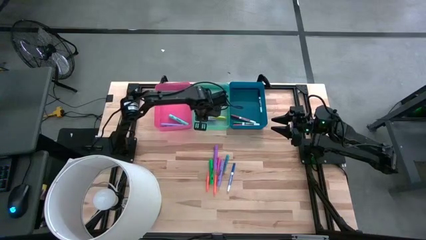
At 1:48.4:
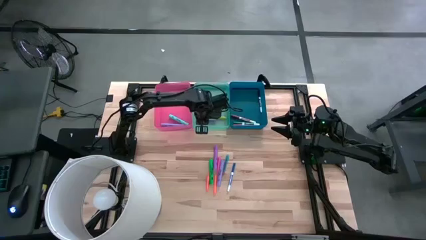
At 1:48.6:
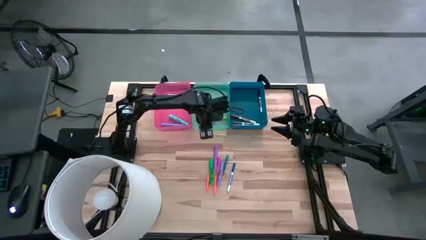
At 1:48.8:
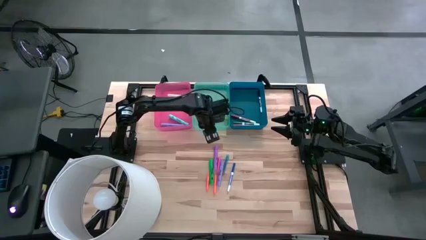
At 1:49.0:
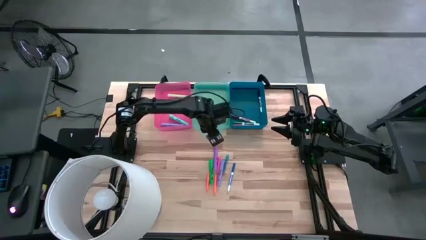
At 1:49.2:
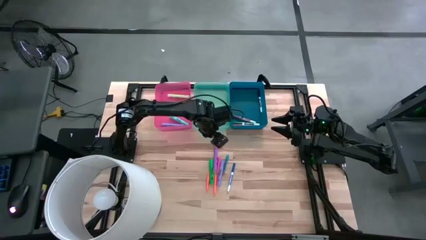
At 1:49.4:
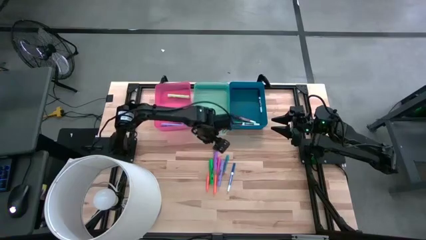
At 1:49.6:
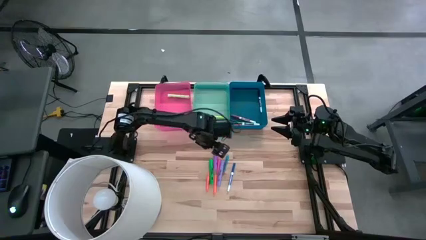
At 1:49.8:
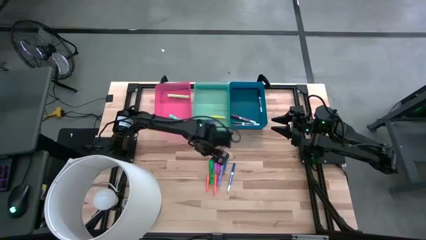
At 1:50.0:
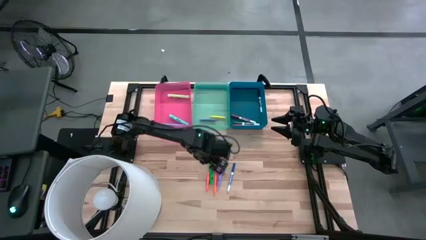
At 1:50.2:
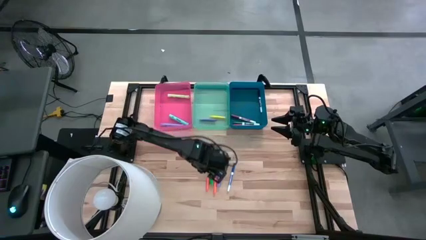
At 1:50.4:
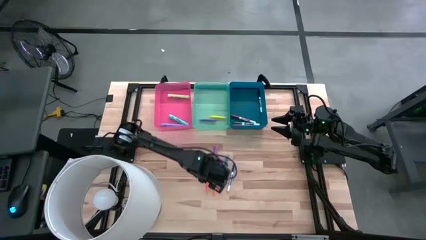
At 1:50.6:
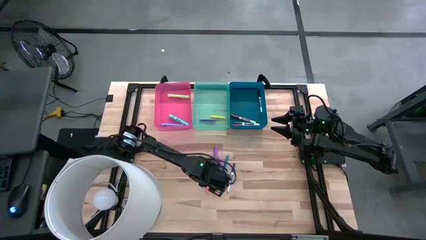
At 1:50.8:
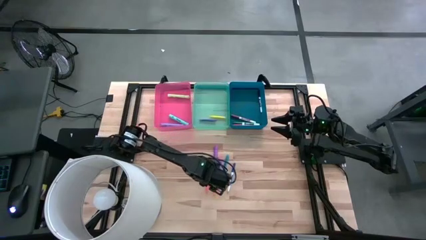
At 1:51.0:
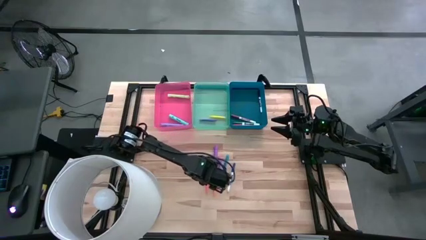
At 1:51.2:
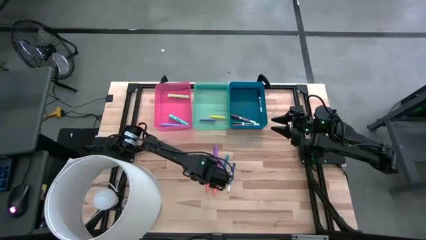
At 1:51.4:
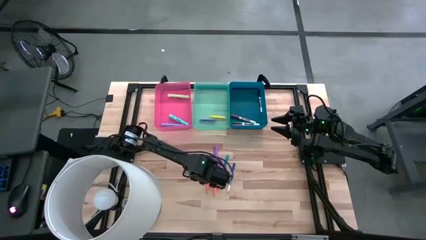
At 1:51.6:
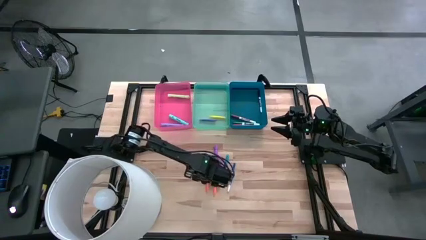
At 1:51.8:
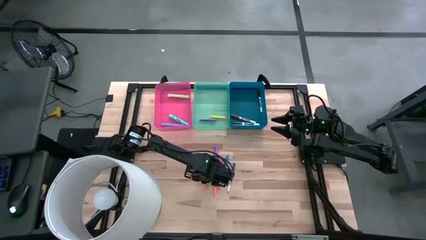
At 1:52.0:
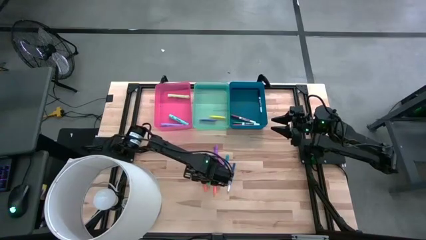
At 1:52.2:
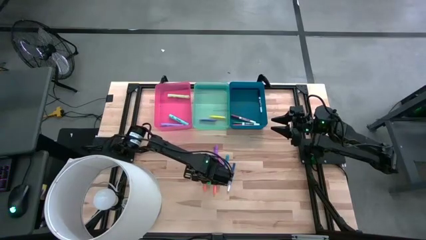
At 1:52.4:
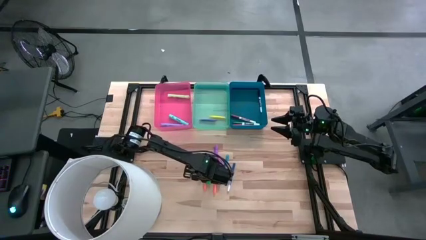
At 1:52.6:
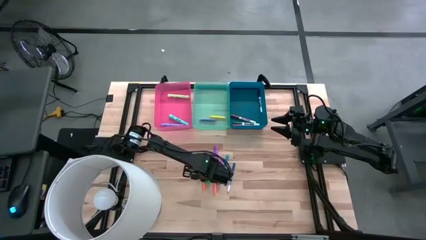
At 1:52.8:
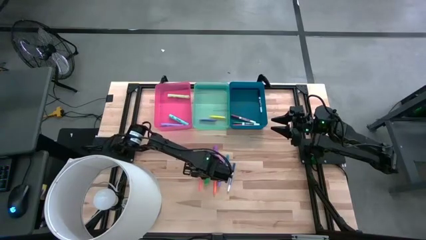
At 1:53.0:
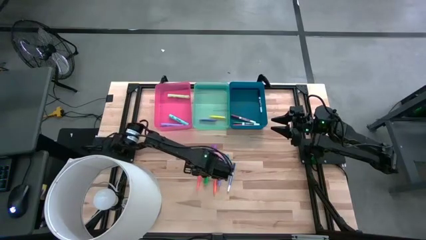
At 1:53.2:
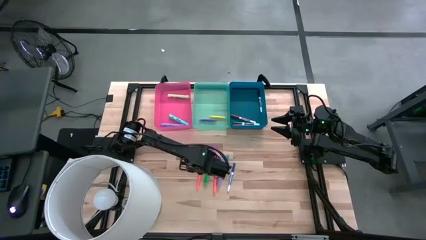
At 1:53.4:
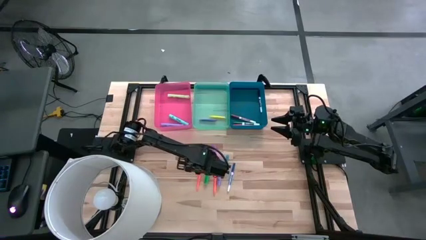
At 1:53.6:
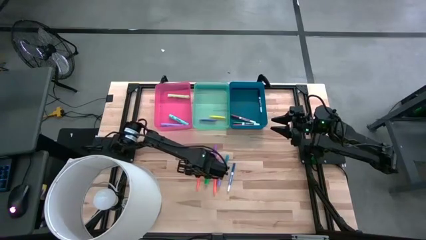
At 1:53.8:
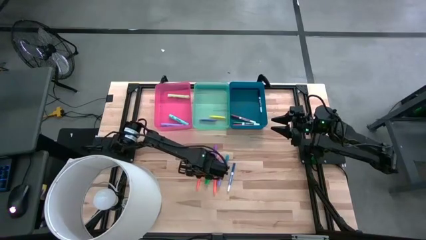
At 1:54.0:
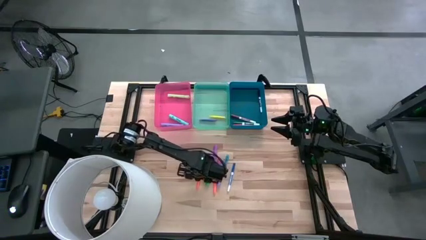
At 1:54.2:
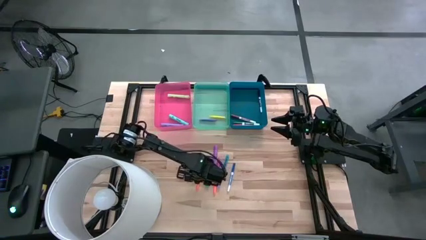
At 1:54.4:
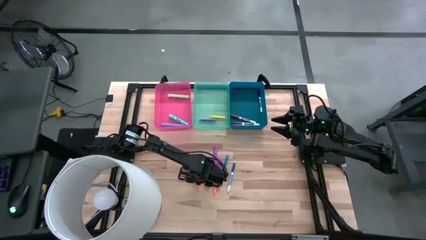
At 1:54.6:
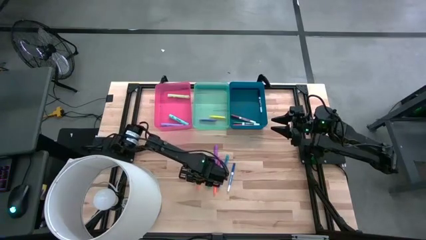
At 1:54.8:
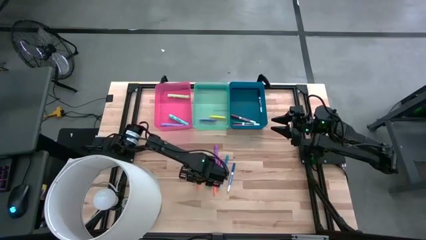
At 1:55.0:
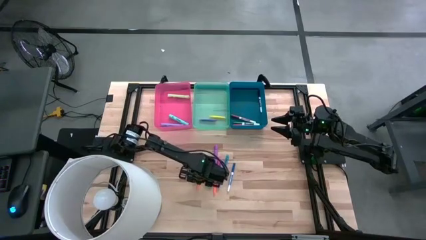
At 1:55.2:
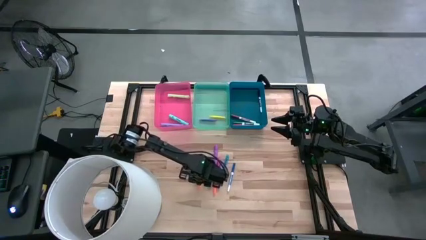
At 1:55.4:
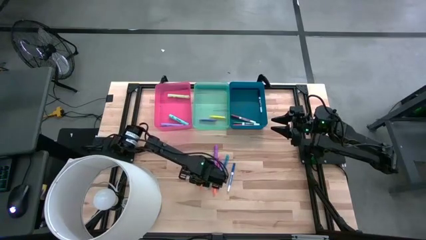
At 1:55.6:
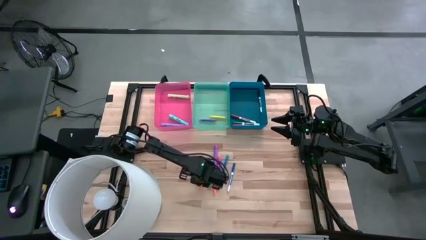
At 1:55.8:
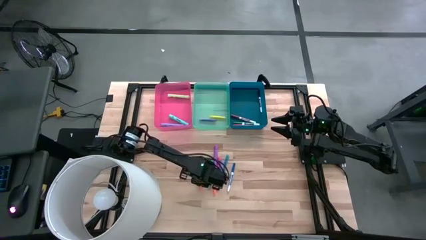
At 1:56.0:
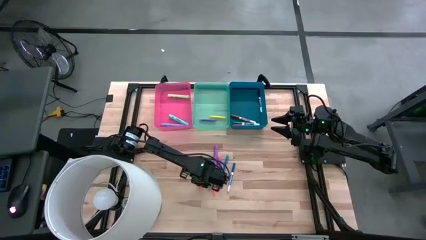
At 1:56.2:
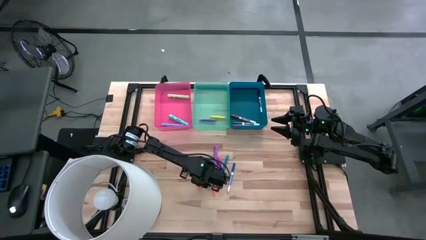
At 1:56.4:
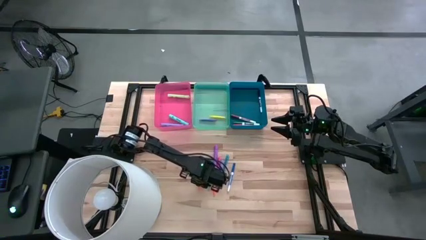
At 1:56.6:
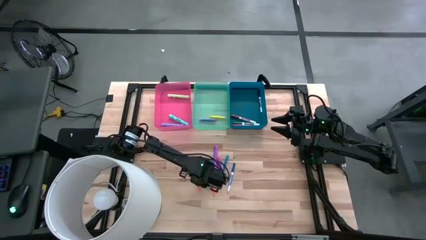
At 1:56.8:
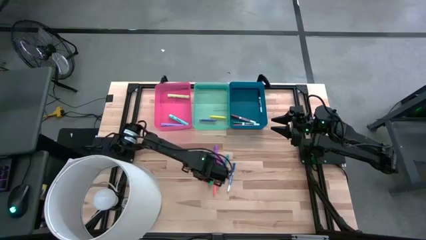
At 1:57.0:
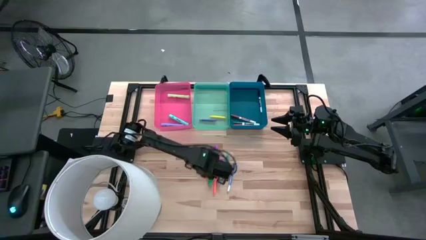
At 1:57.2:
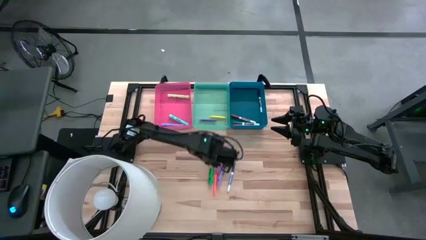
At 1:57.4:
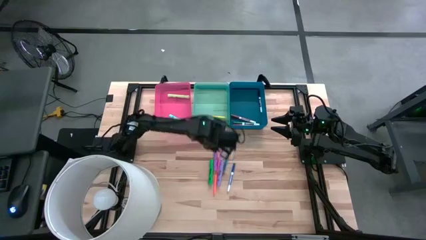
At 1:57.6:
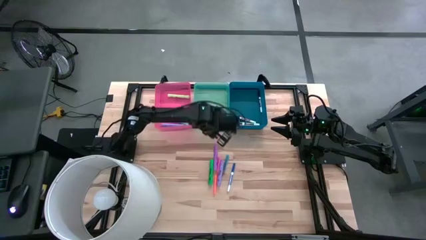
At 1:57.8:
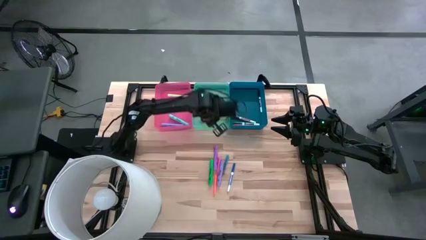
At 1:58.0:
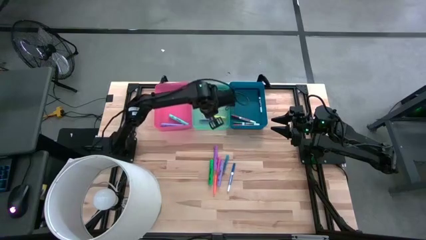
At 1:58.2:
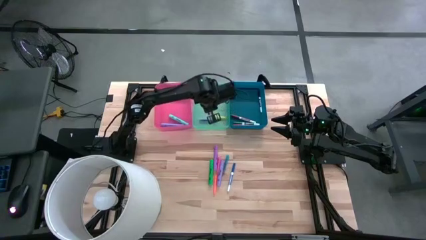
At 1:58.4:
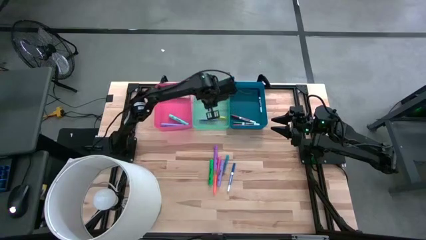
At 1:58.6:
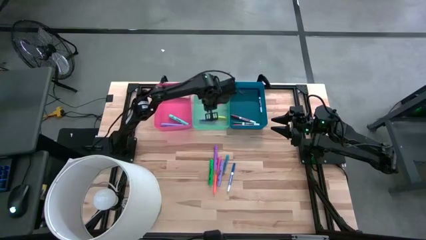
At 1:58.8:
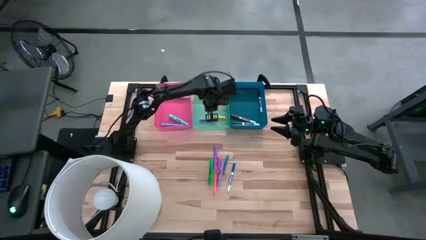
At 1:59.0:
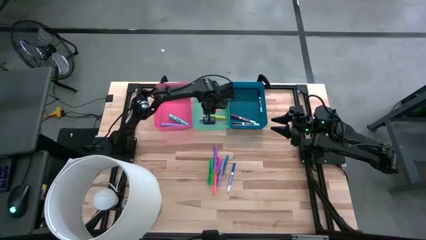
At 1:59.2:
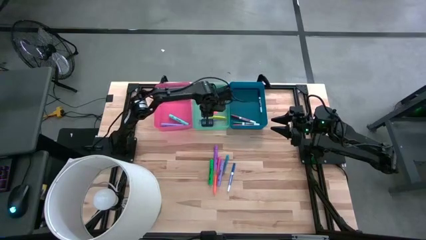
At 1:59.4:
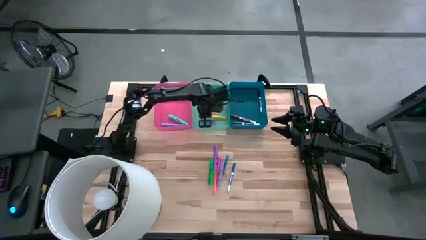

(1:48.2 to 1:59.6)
Task: Pick & Place Markers
Put the orange pen into the green bin

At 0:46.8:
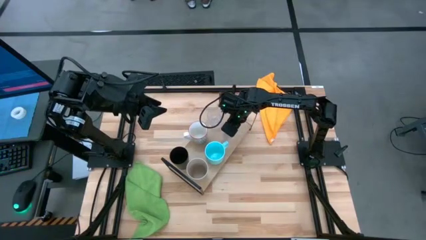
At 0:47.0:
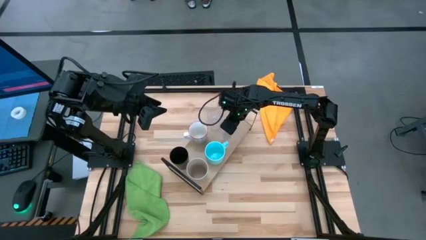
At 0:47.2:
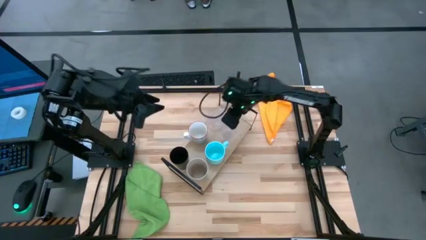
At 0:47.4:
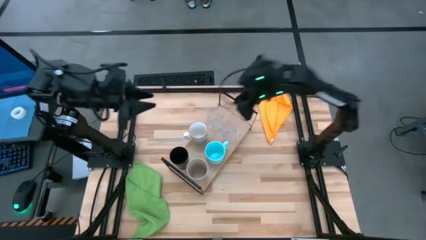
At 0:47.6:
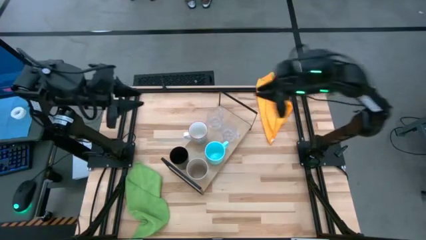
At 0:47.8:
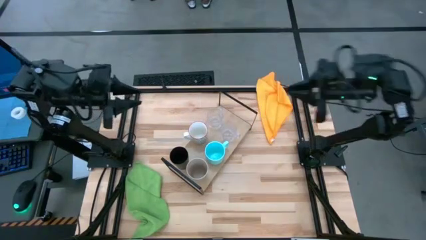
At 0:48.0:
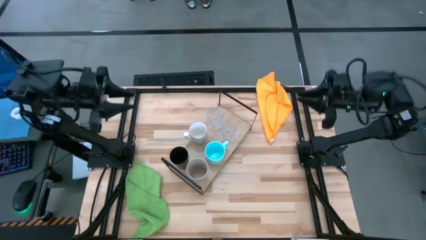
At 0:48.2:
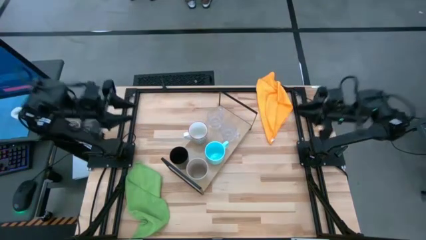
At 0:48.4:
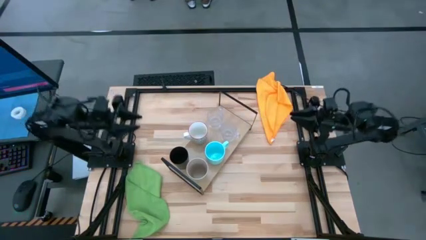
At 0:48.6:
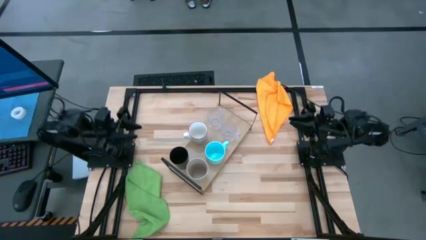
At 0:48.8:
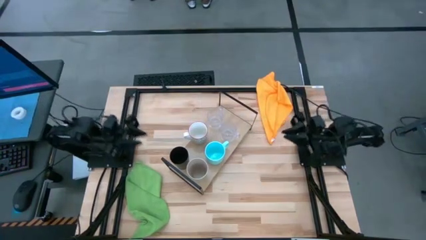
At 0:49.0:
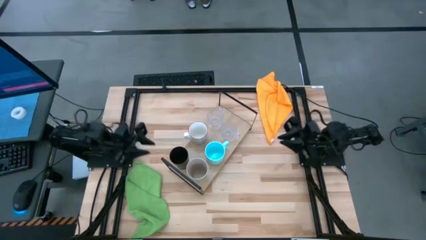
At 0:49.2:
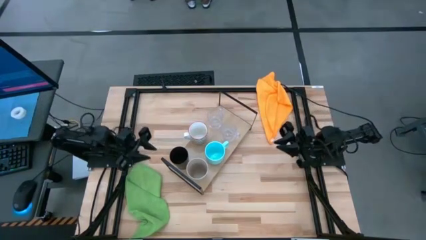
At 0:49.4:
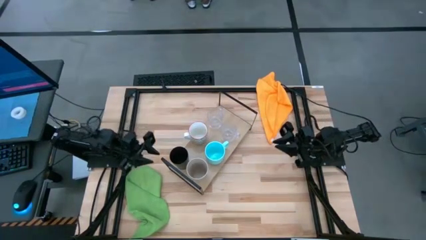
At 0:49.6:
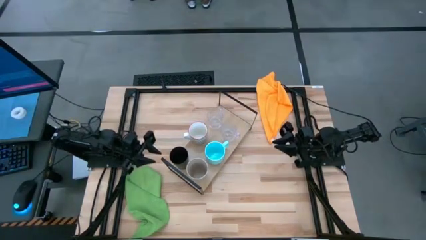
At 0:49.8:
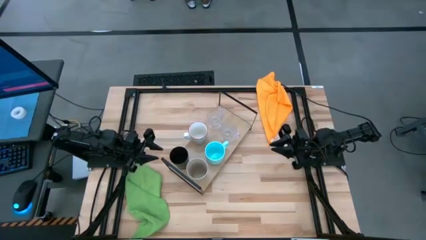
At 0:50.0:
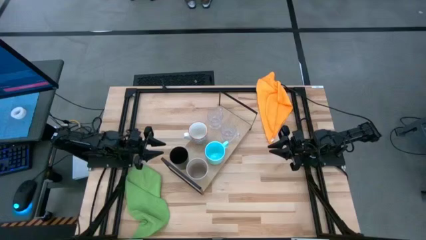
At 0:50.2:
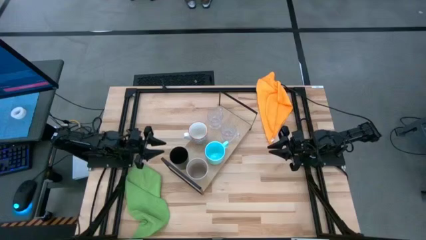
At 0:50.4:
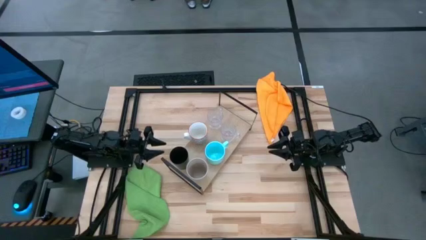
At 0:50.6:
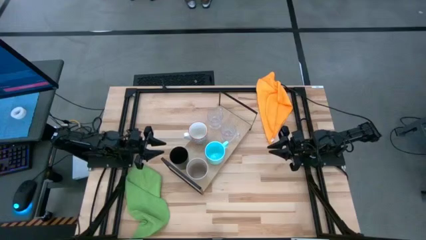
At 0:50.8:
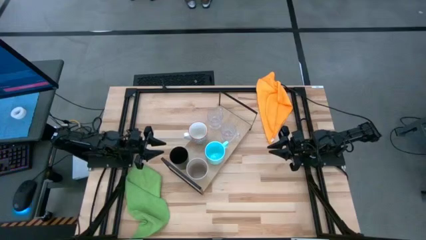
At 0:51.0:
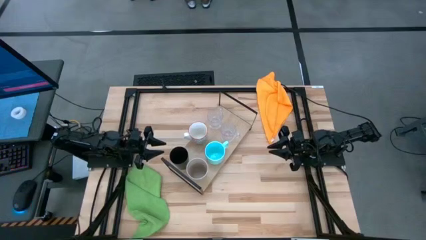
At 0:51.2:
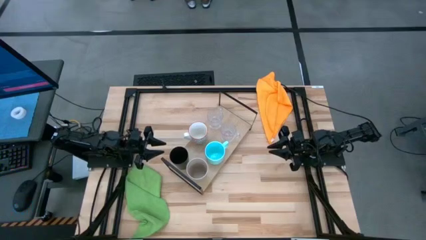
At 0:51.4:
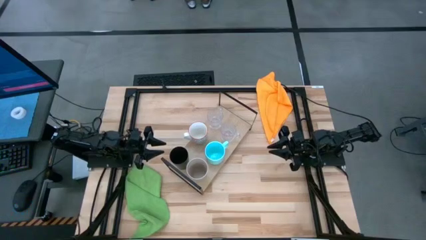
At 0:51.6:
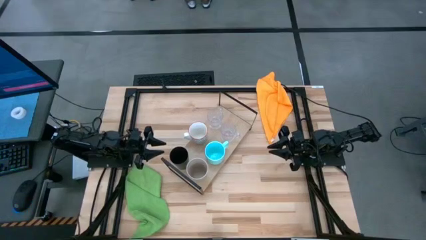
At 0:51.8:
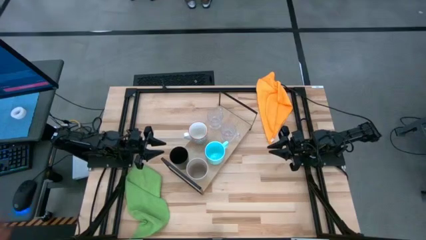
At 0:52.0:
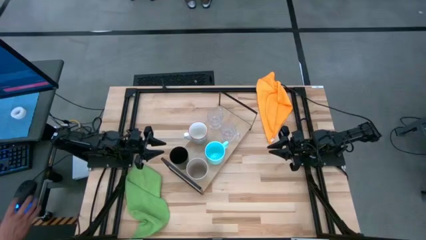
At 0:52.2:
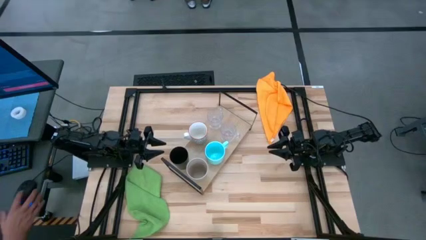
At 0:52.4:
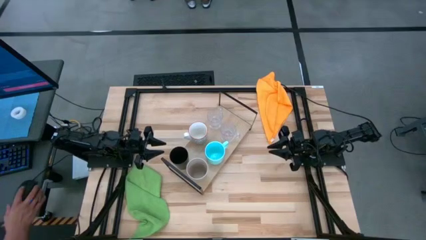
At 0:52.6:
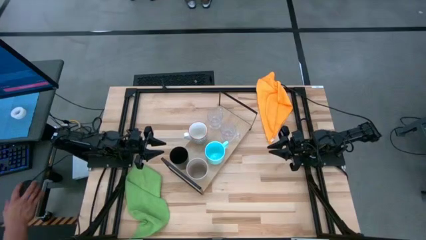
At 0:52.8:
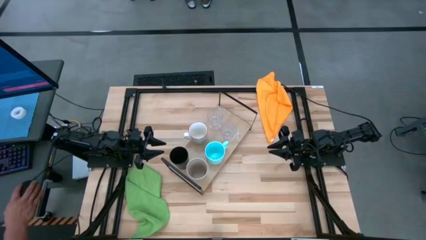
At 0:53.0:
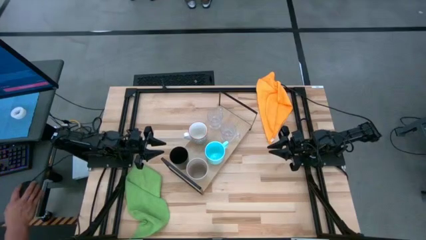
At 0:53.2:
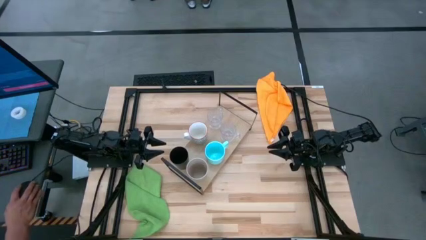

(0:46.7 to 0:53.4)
Task: Stack small to large cups/mugs on shelf
Return to Home Position
